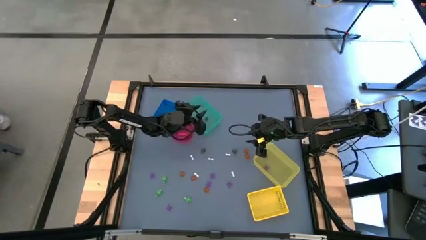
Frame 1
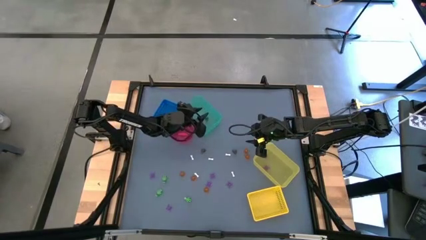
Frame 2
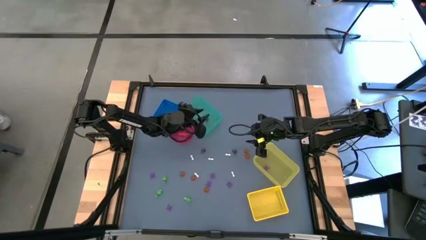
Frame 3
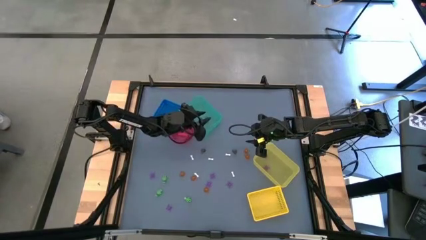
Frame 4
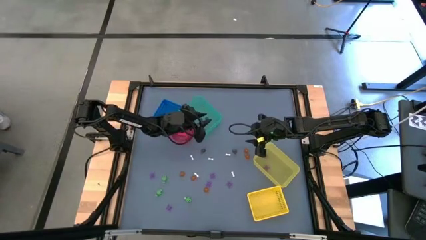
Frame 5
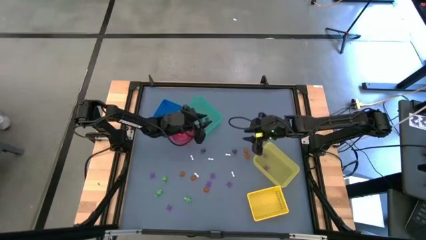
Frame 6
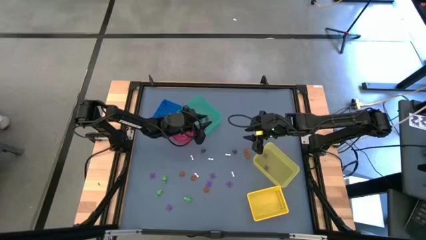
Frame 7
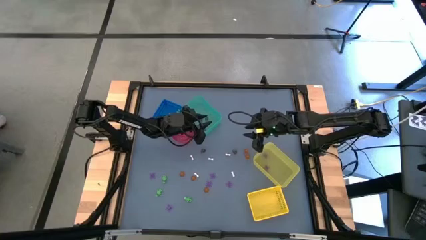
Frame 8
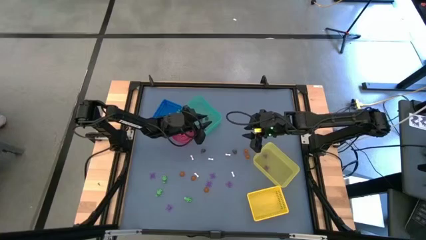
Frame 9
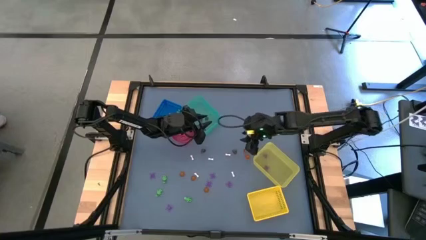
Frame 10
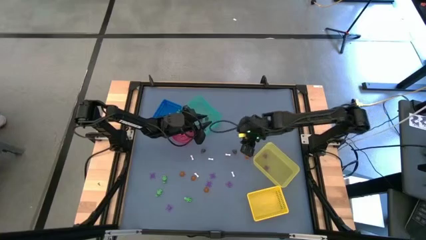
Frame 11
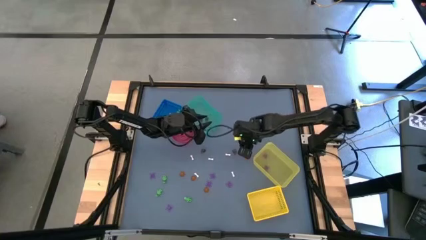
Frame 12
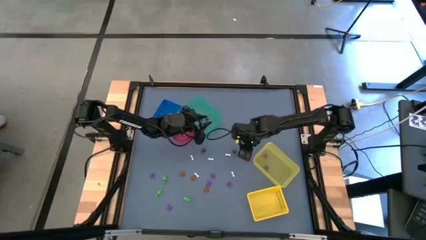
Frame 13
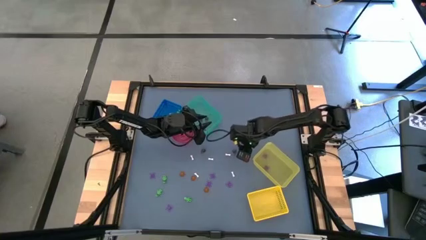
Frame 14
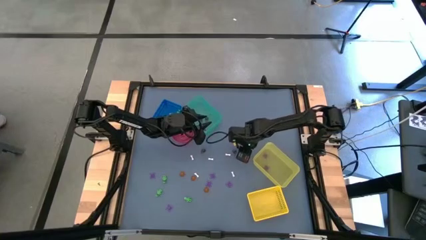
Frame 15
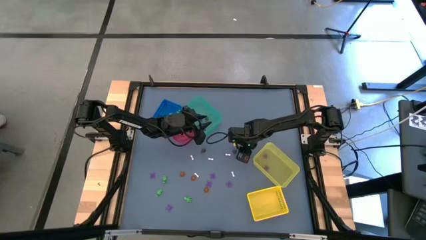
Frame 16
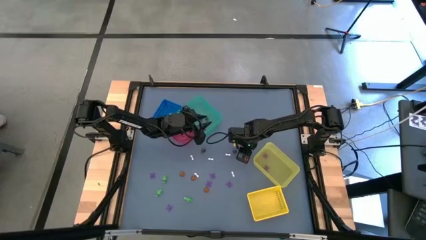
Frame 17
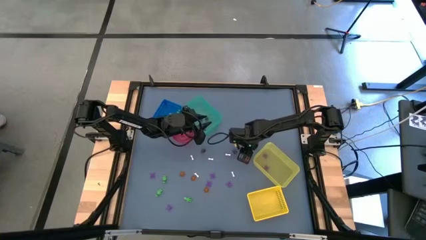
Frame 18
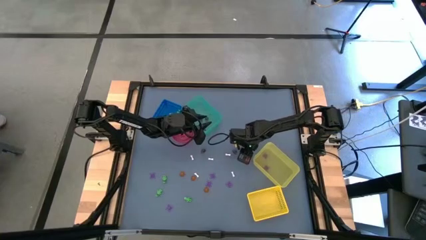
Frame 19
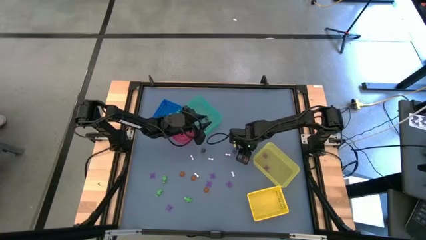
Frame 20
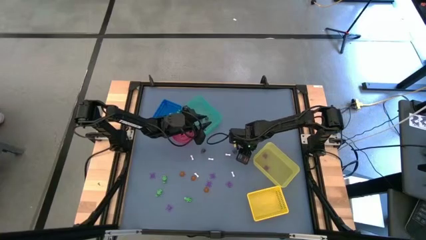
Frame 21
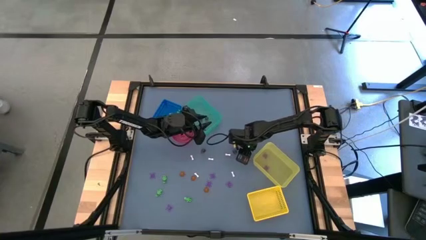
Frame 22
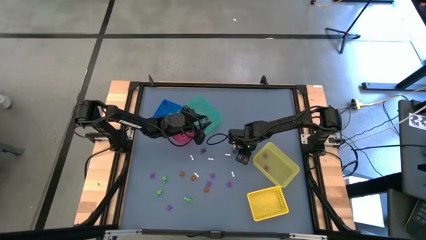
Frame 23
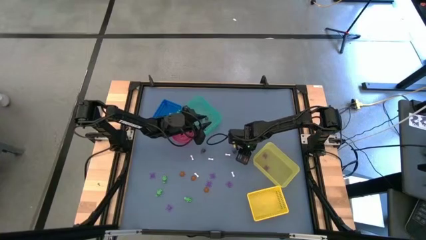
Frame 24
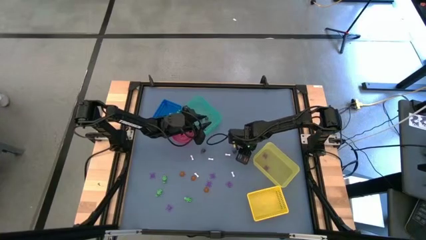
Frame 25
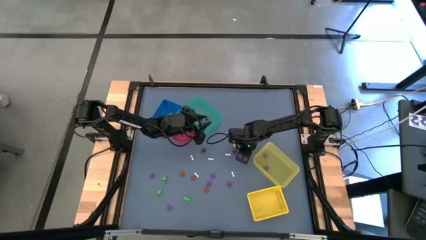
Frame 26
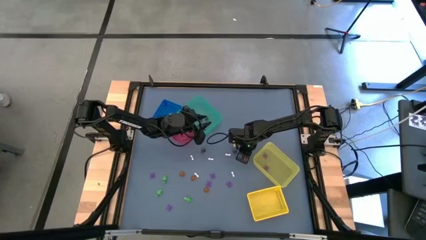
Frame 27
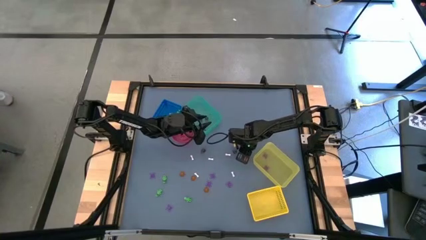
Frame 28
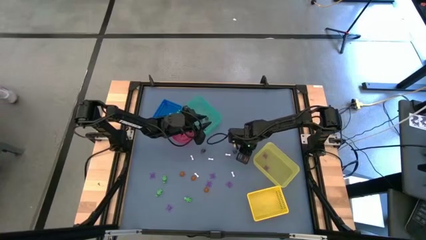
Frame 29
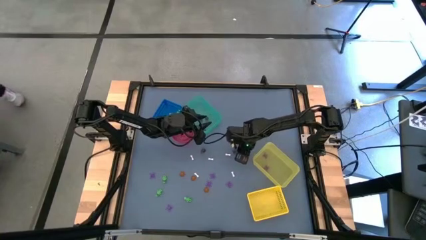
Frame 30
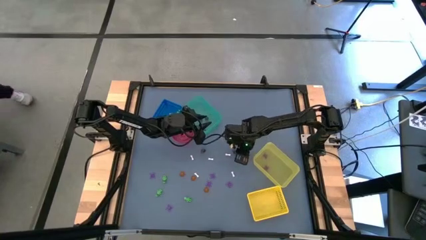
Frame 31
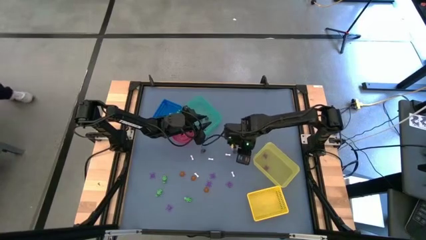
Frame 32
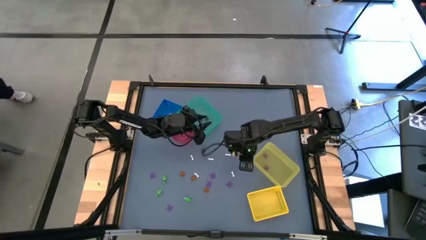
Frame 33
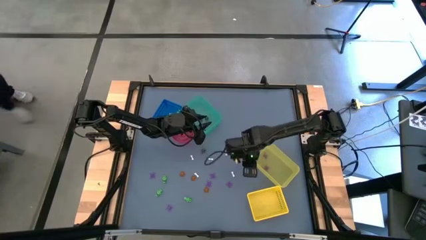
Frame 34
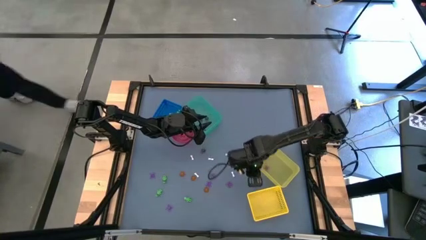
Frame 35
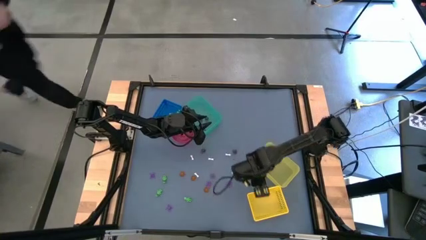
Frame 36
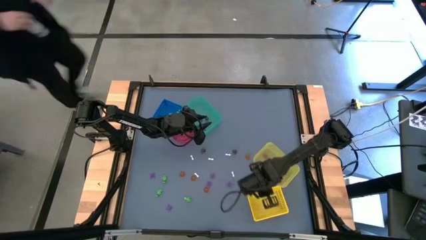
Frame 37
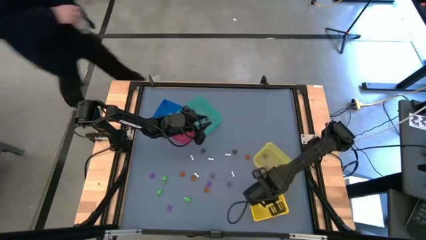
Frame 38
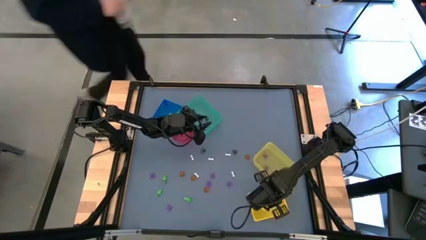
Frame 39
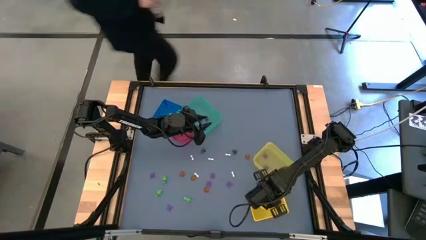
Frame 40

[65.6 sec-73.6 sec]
Task: Sort Halloween decoration
Put the orange pumpkin toy into the yellow bin

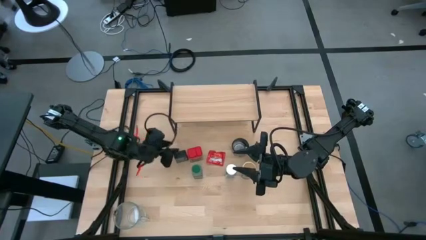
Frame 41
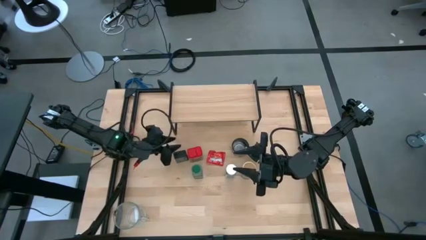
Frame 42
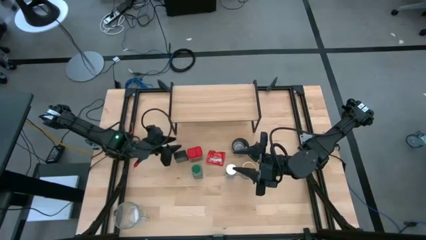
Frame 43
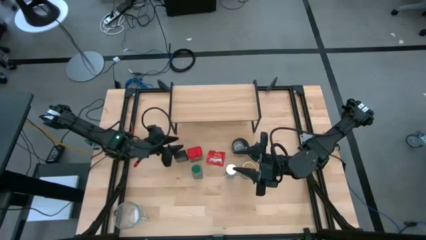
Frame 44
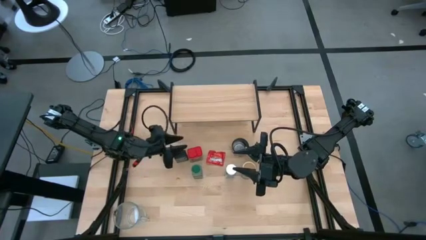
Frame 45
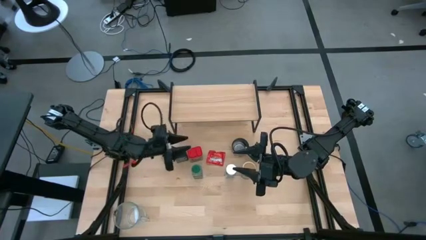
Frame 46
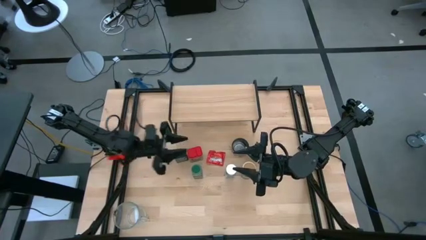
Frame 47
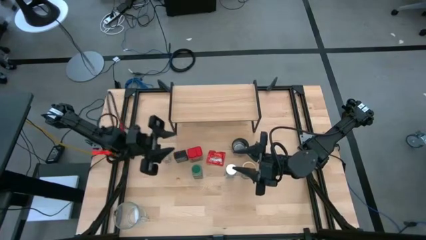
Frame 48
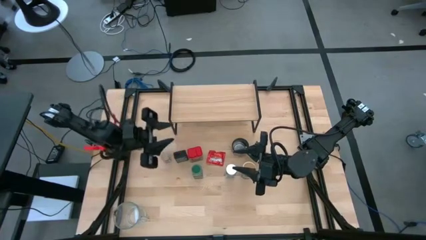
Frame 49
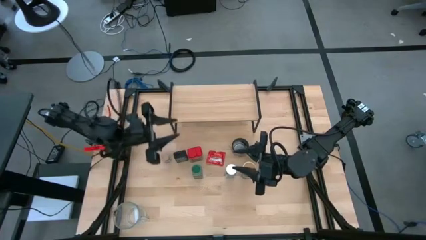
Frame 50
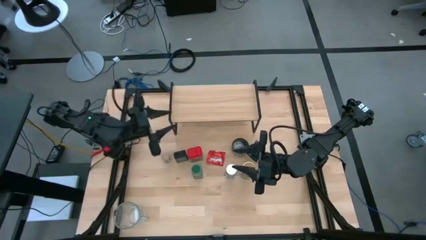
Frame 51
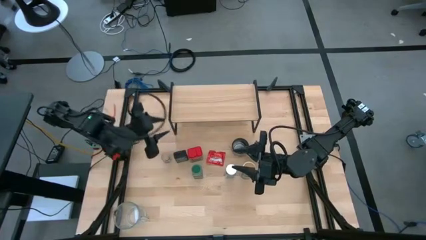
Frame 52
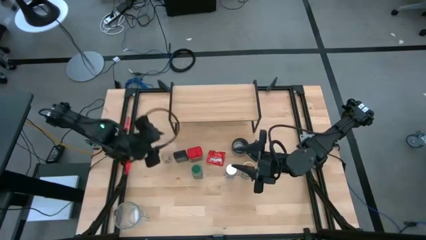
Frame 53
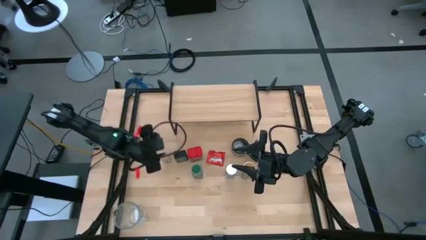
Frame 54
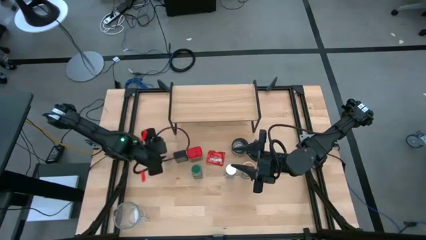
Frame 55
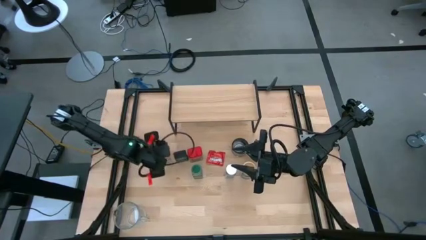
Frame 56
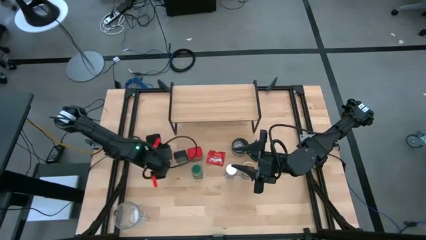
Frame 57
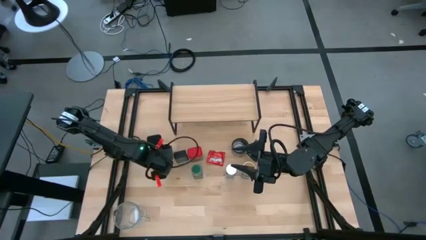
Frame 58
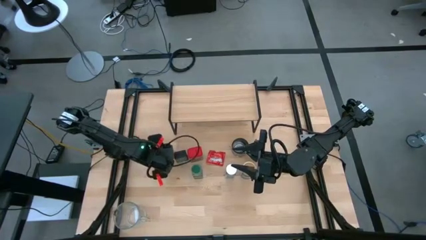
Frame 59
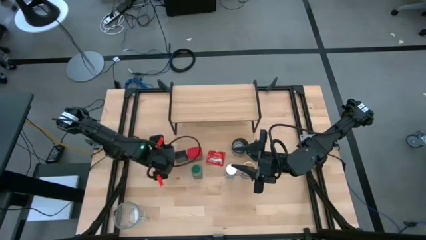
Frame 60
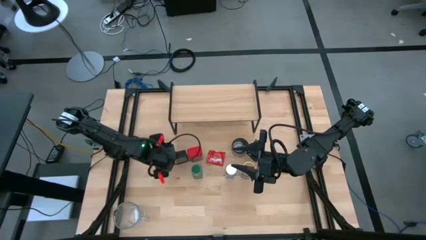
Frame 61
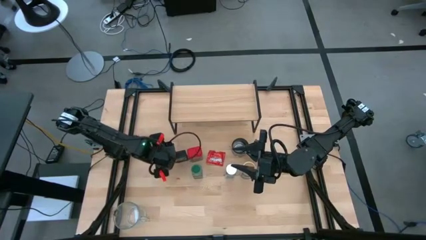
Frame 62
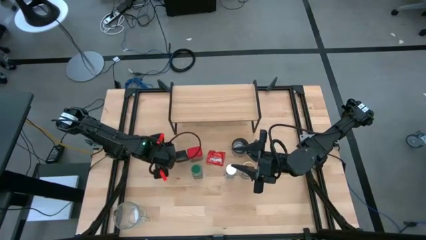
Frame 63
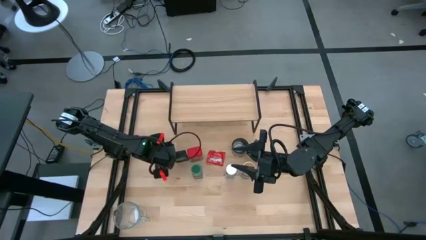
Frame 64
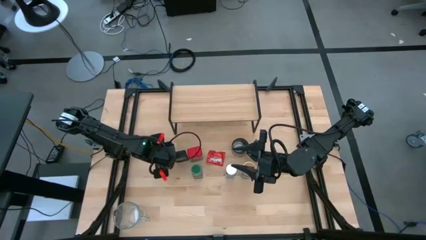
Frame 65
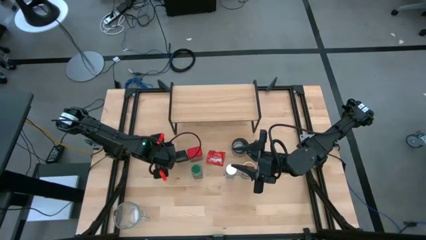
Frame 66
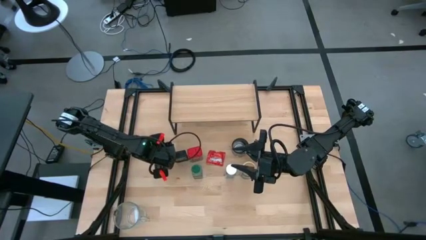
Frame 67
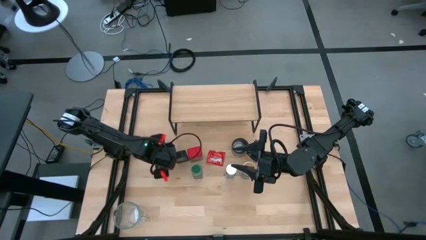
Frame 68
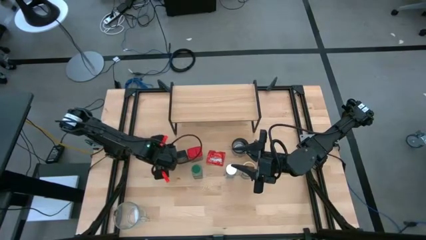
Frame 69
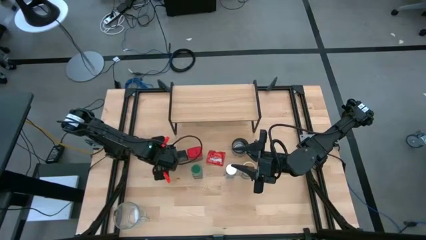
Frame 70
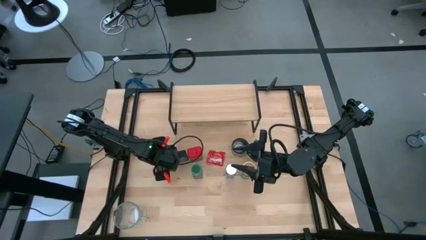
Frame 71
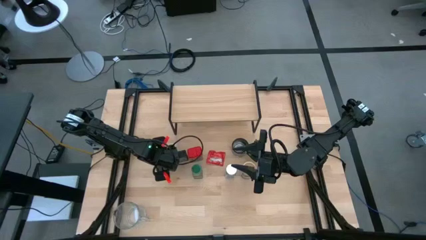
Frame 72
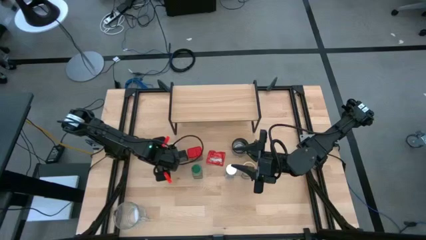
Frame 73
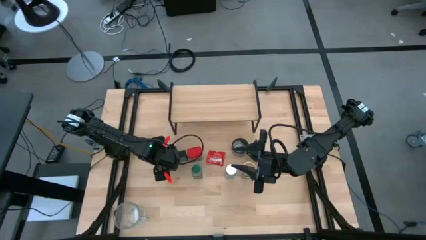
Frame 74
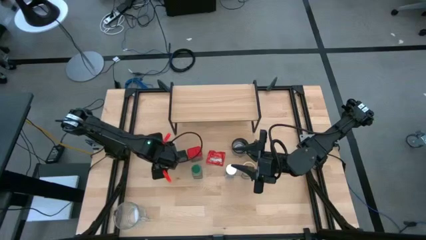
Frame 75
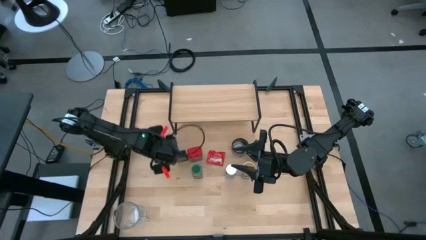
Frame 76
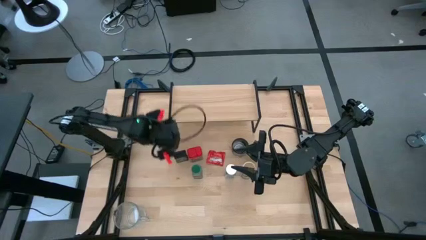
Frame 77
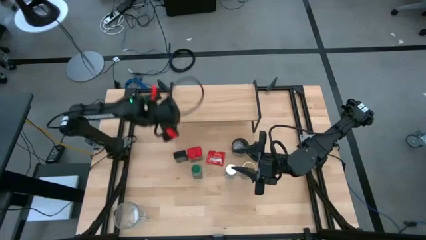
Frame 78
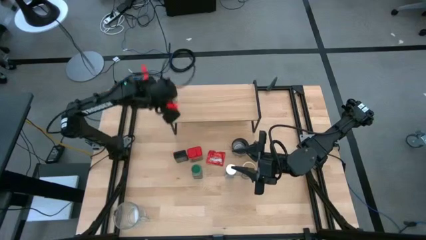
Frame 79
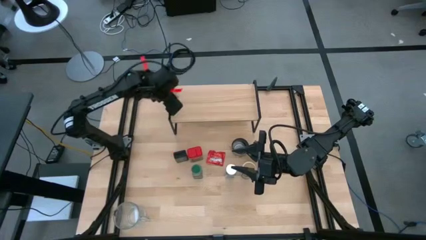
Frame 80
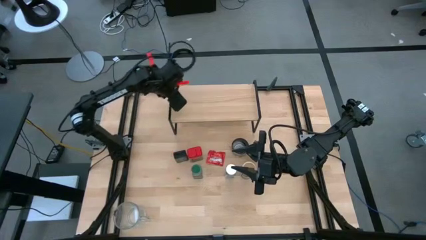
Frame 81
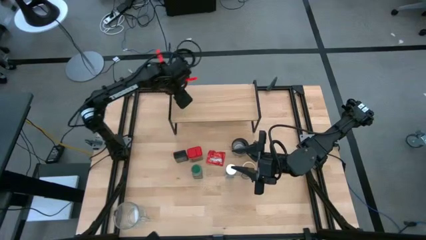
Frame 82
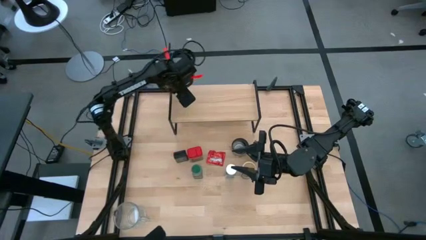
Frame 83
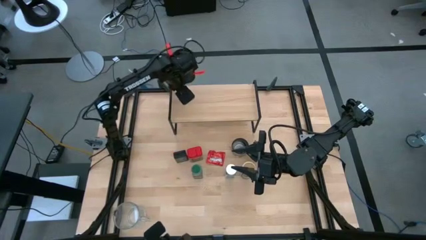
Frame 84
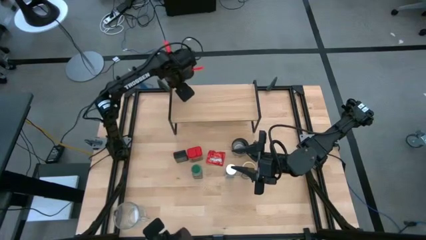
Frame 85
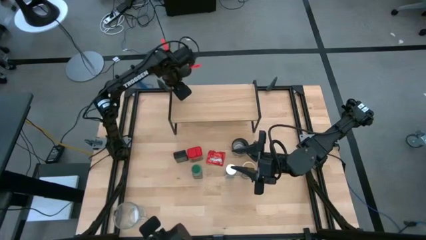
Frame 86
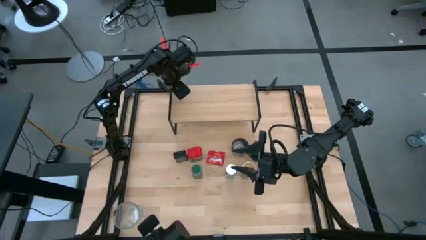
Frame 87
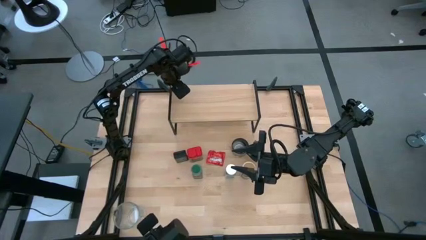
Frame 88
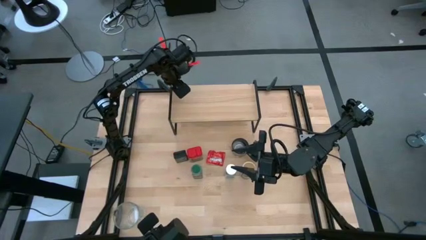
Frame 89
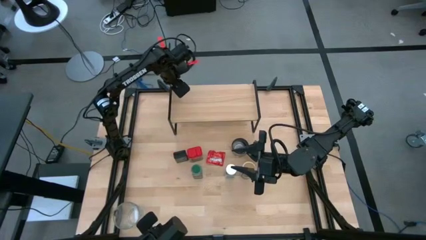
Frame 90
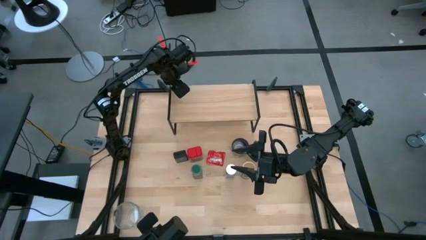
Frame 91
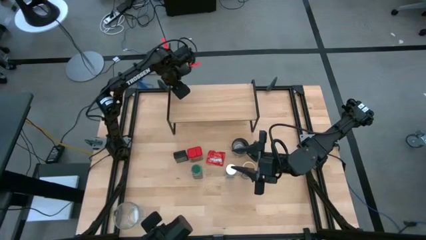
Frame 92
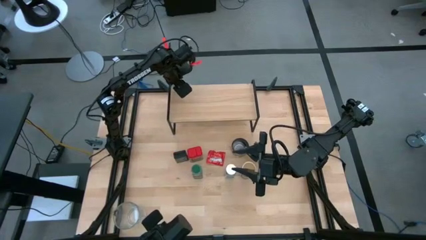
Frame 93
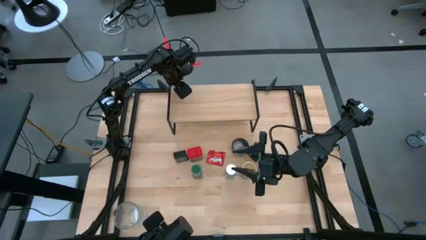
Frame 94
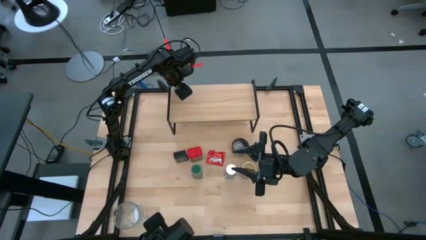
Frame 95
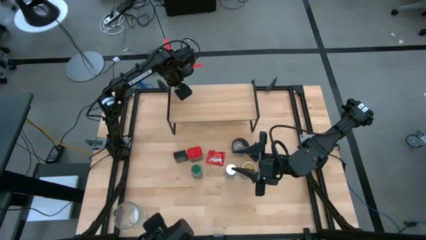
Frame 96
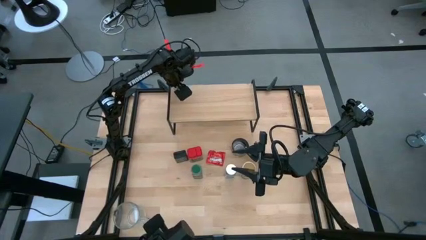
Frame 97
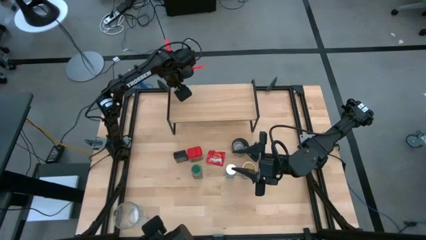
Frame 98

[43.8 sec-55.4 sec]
Task: Shelf spices
Put the brown seasoning bottle on the shelf
